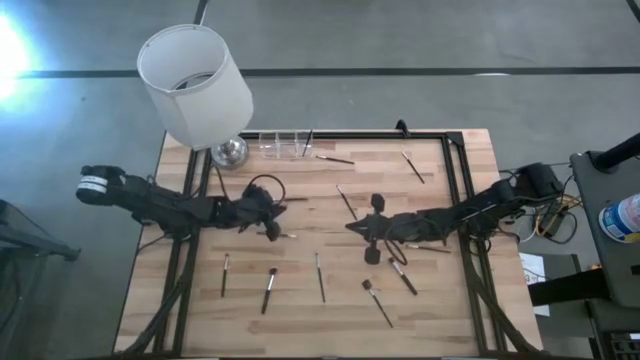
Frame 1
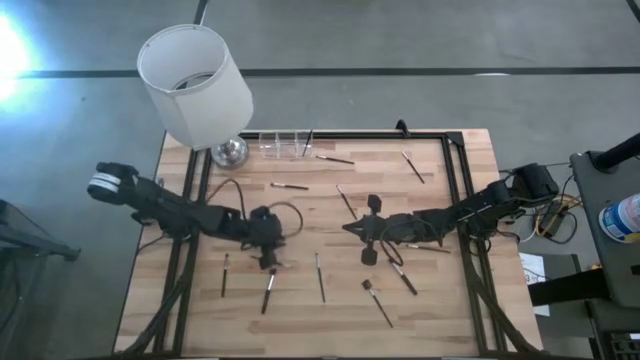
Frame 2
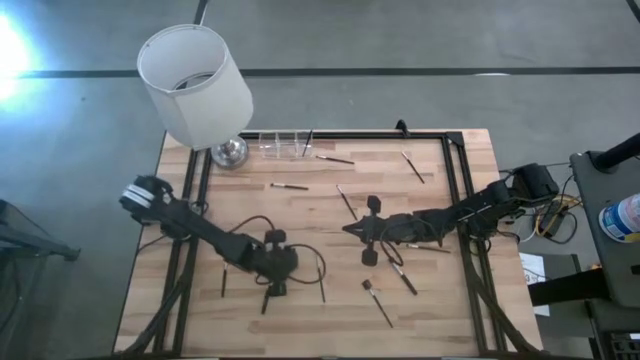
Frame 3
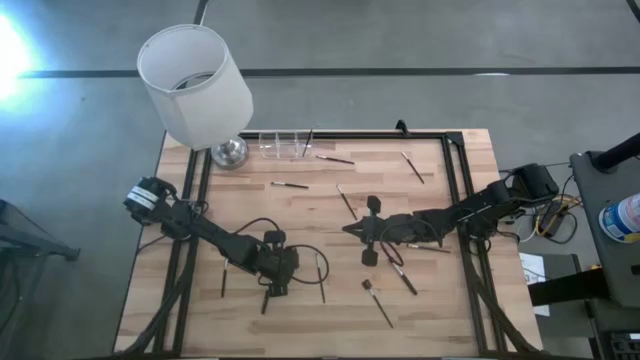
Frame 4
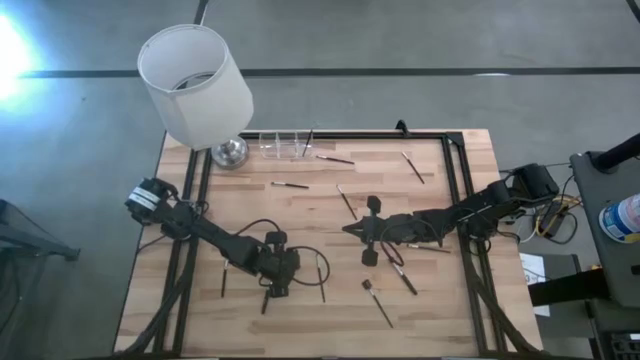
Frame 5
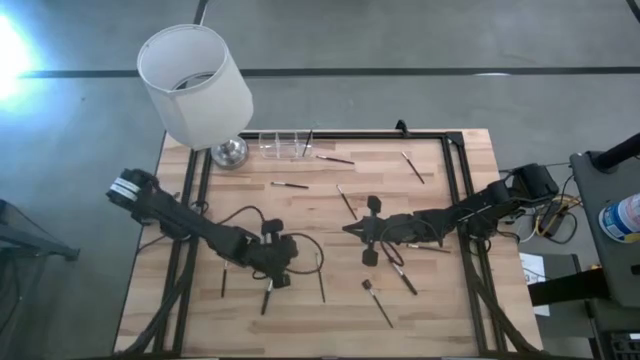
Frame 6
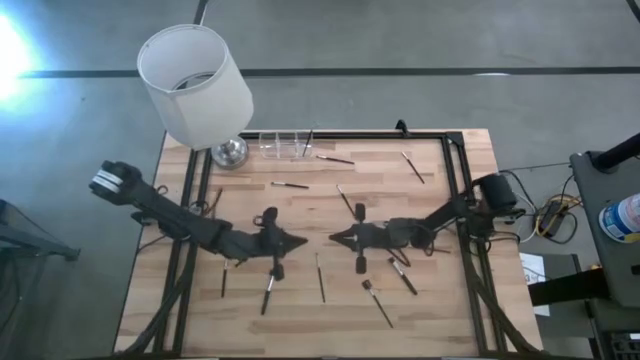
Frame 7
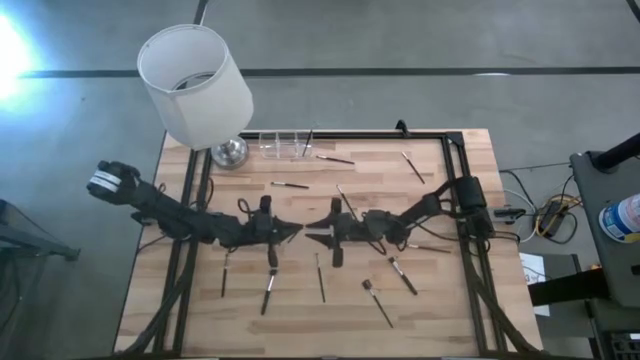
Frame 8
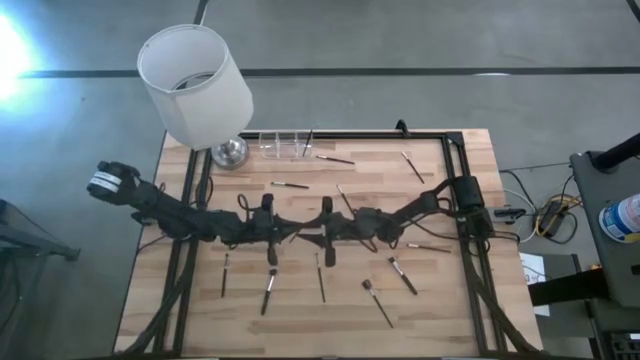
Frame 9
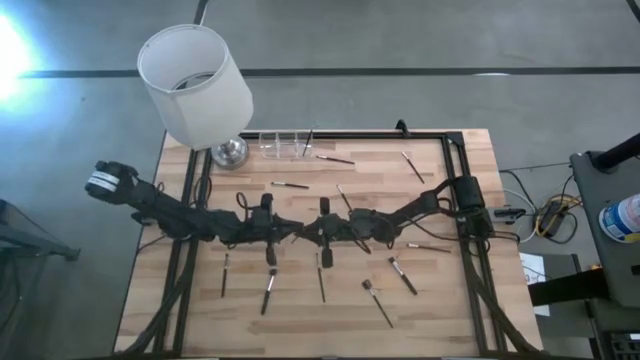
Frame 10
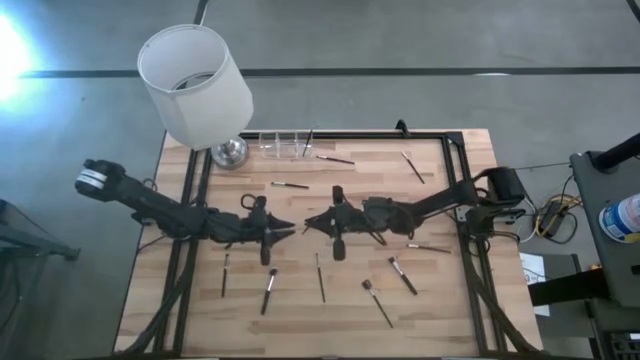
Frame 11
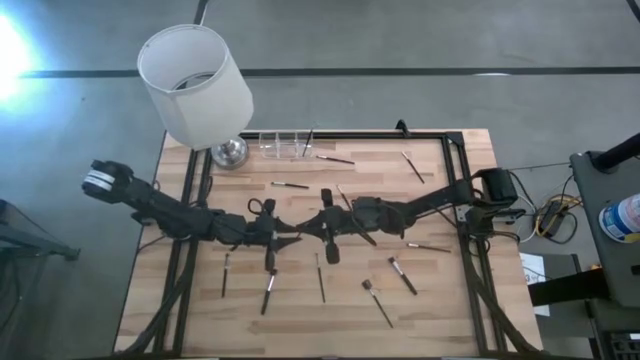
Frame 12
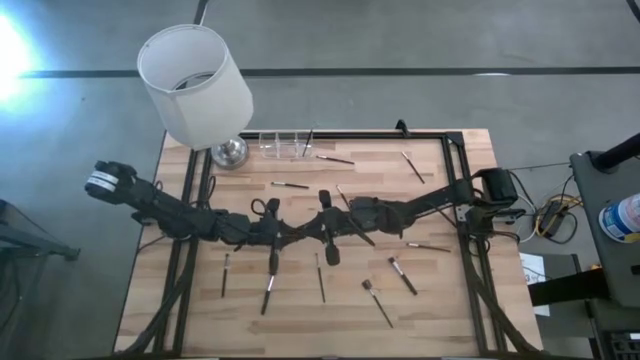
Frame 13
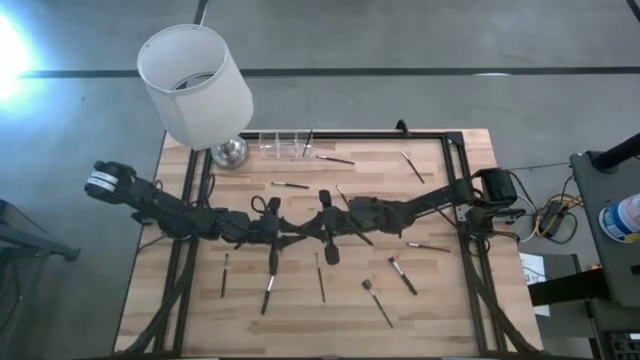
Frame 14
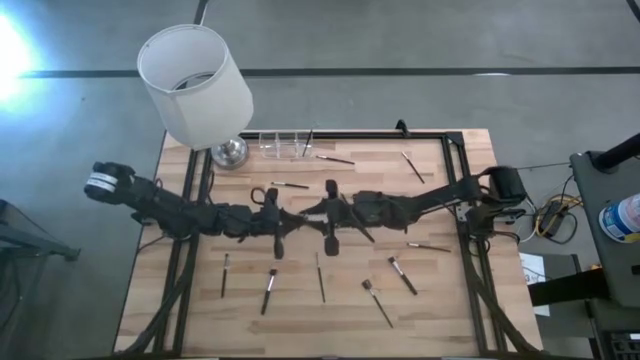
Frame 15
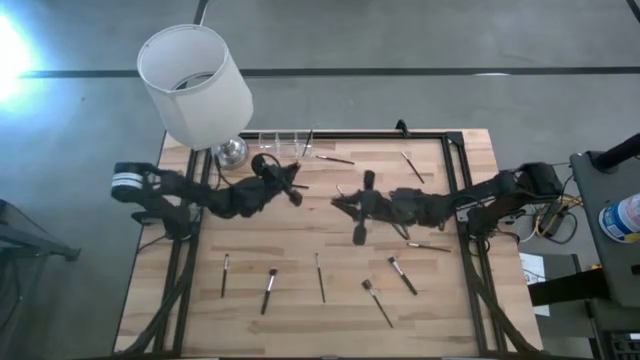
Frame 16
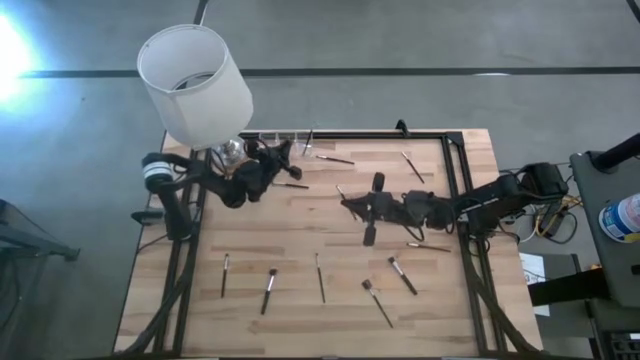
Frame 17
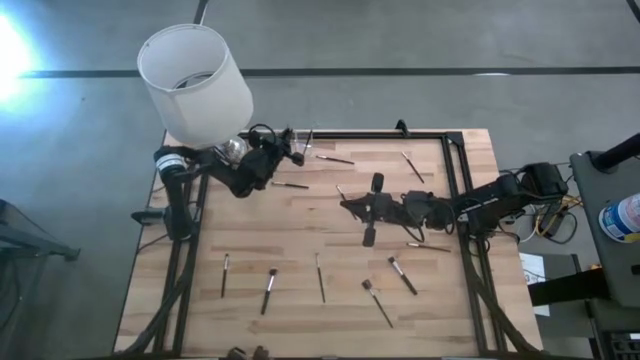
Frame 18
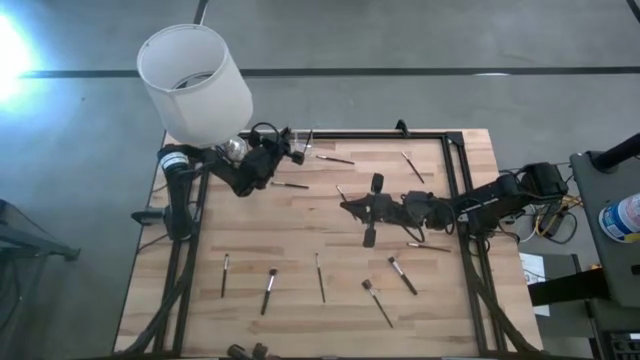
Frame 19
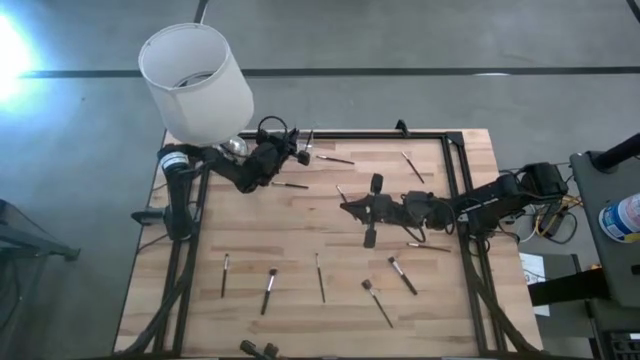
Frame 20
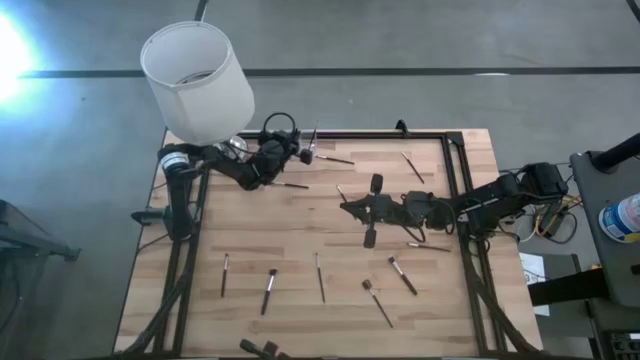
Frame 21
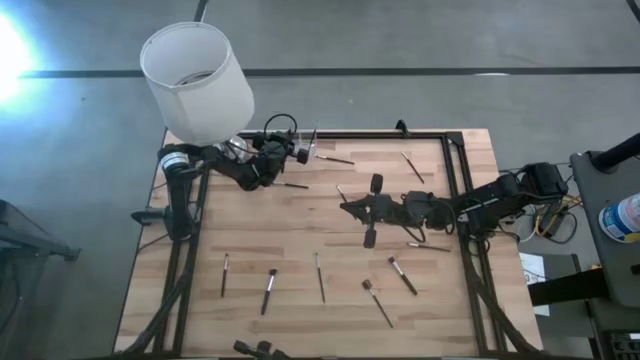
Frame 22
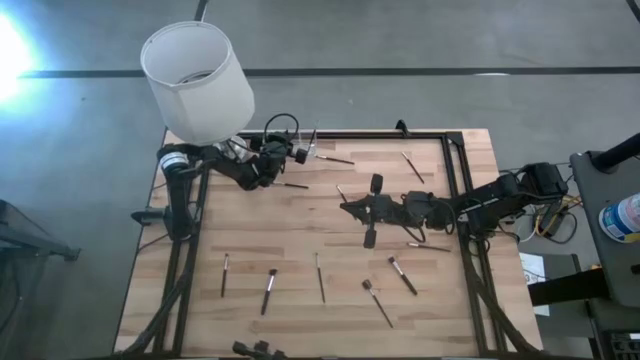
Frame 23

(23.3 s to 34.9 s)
Task: Put items in baskets/containers
Put the eyeshadow brush into the transparent organizer

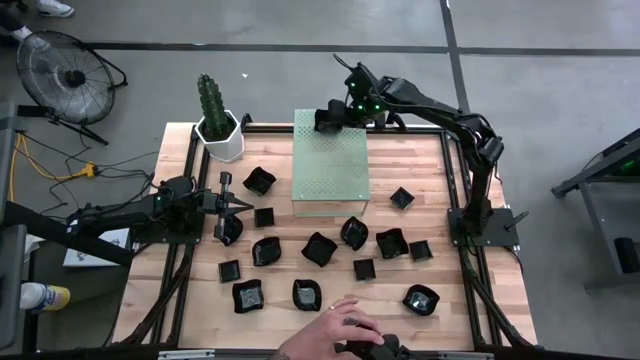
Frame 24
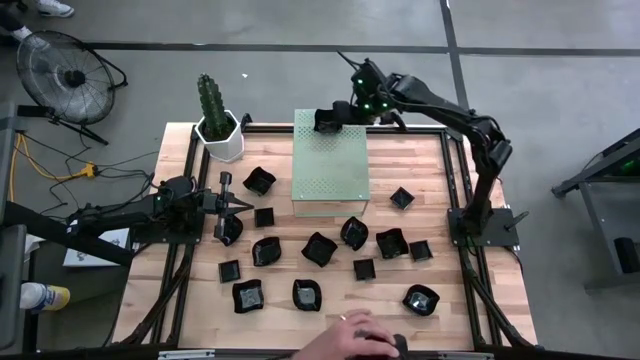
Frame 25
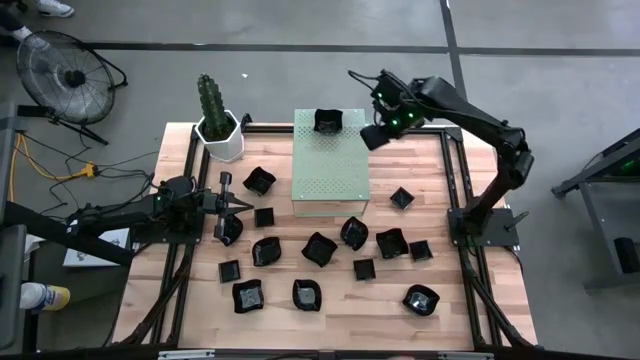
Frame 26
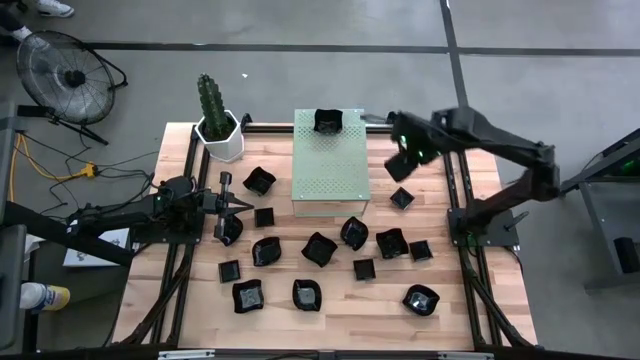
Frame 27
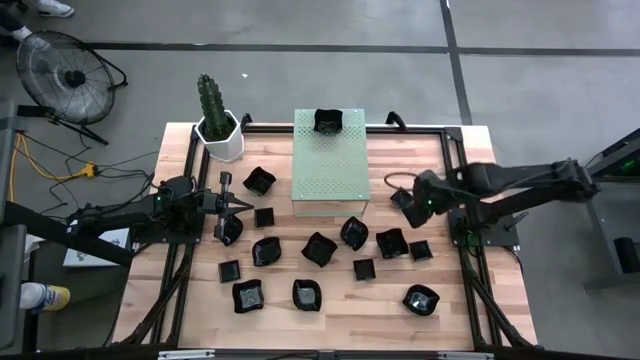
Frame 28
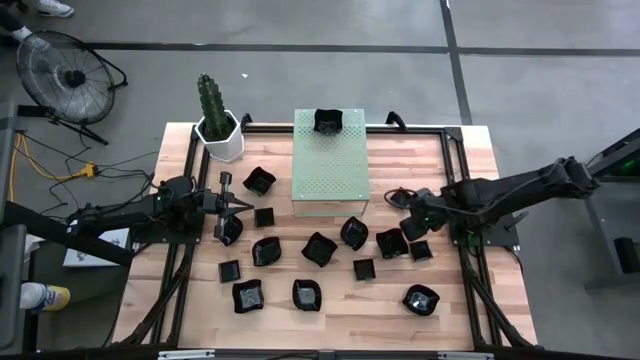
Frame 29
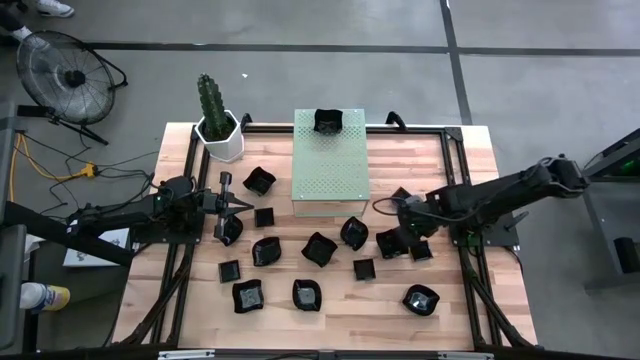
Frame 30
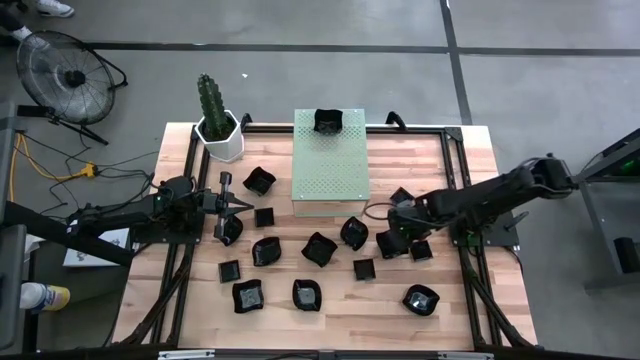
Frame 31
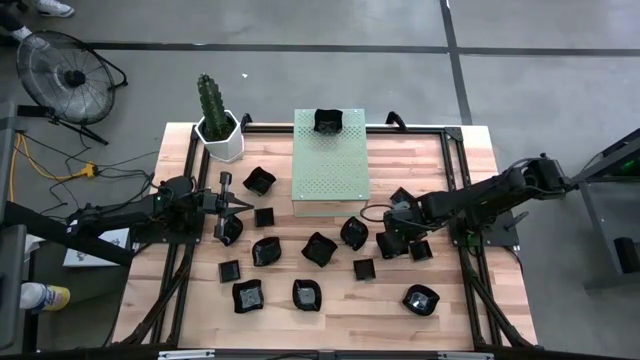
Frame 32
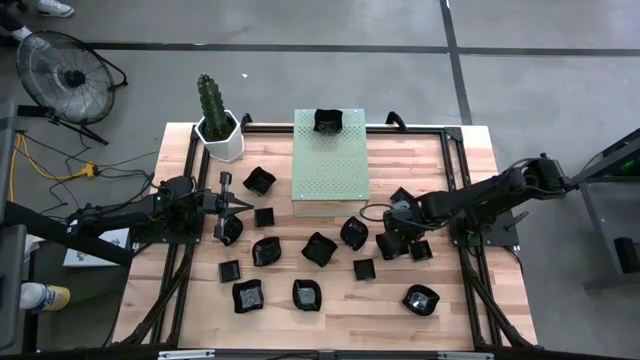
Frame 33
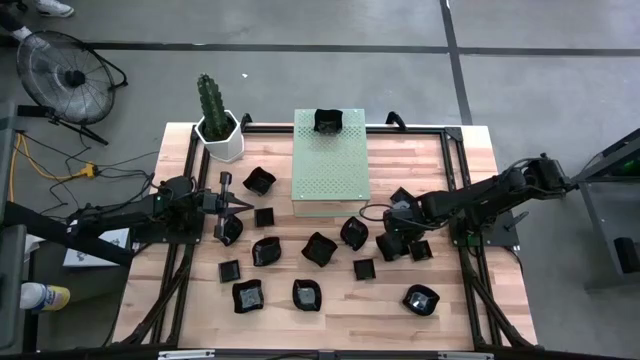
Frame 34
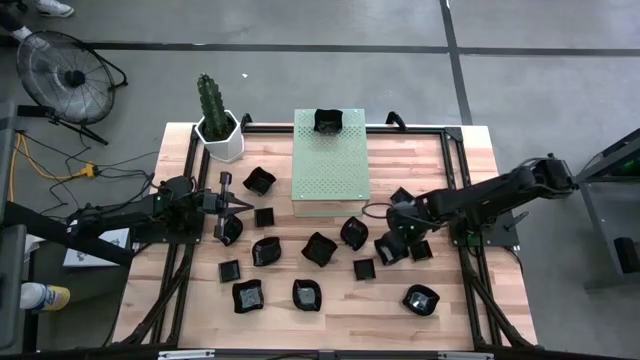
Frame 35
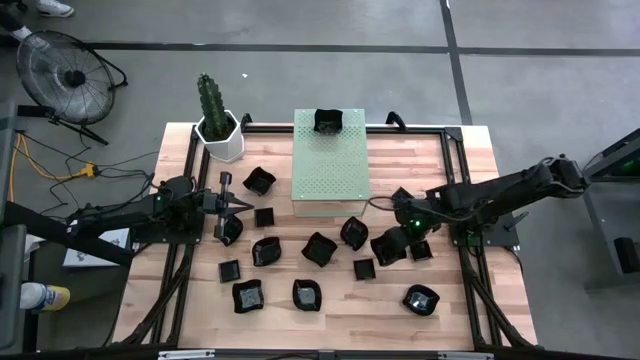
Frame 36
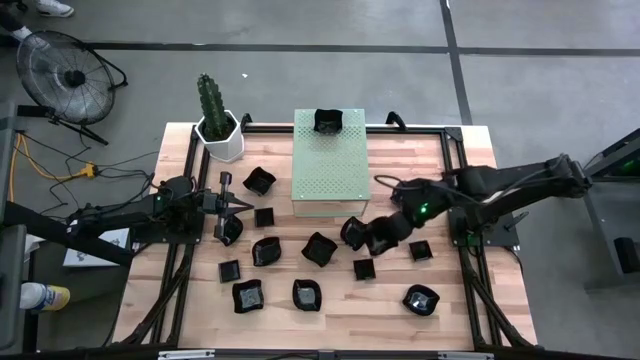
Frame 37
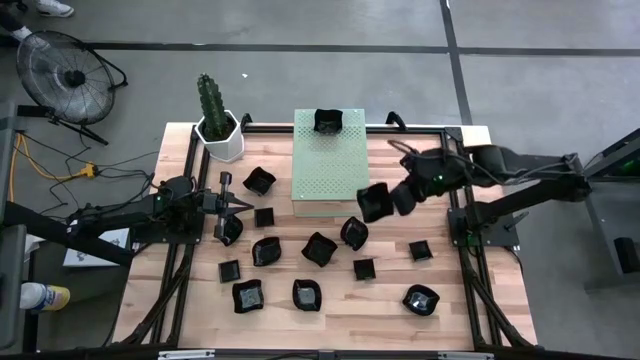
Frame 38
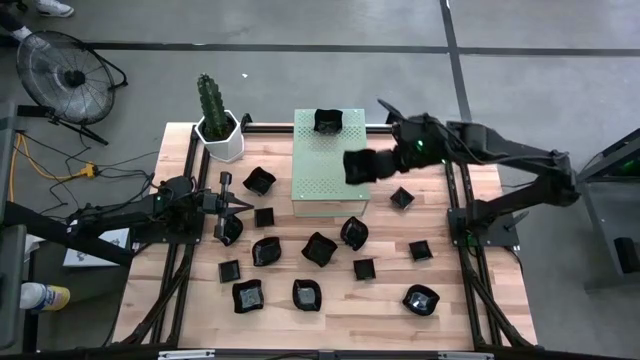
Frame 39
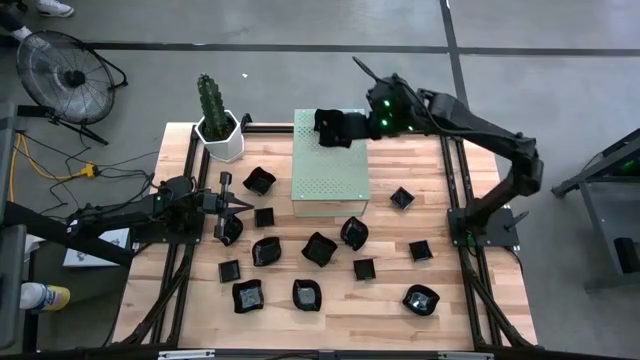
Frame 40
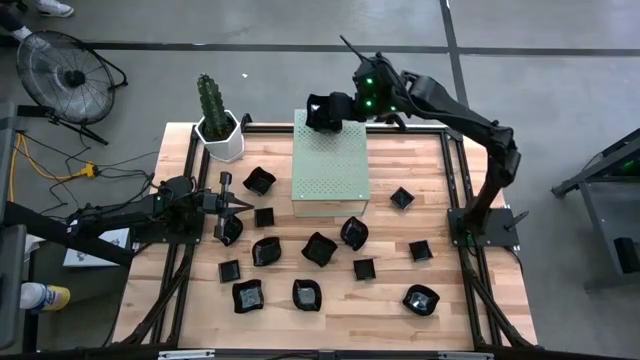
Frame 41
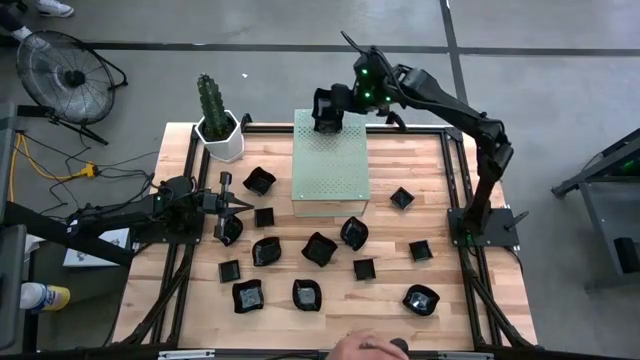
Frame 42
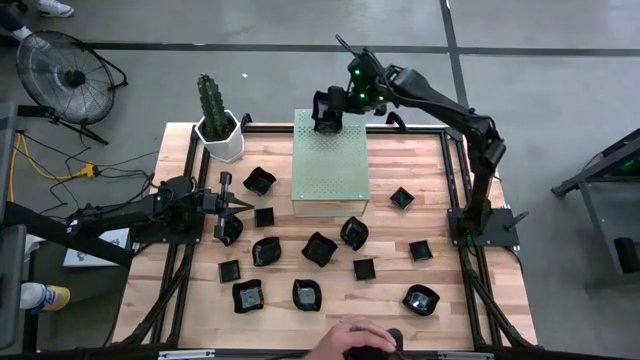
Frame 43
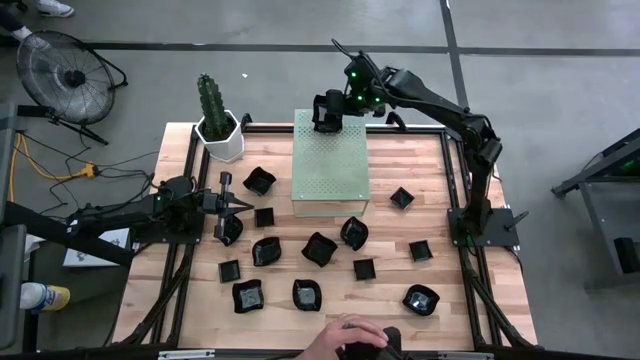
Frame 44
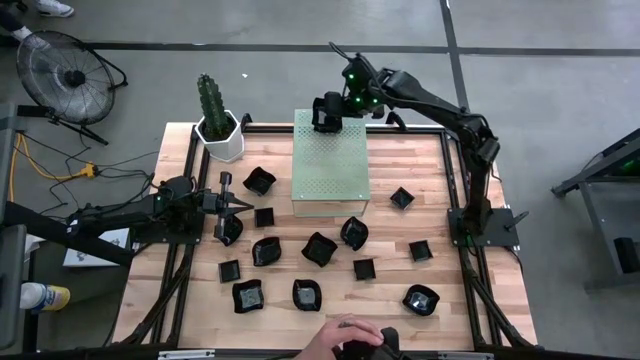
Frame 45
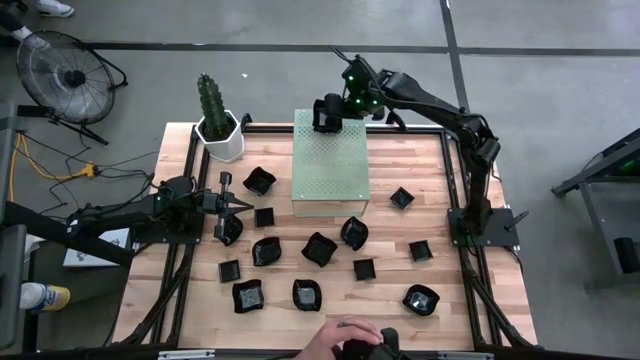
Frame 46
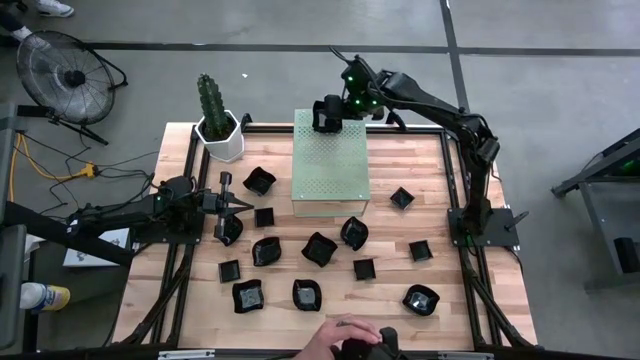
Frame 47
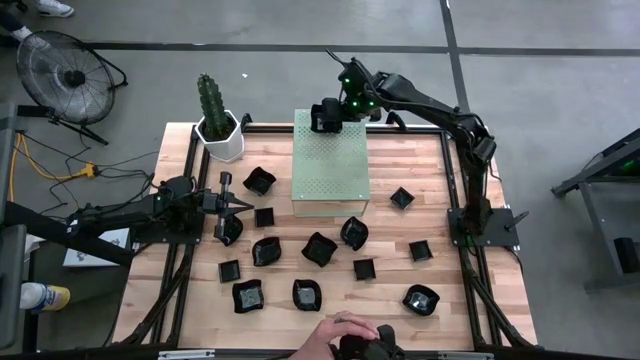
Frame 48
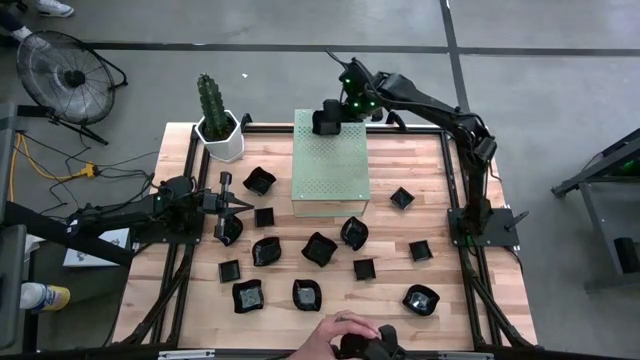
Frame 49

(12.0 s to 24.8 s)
Task: Pick & Place Mini shaped plates
Stack the black distorted square plate on top of the black distorted square plate on the shelf
